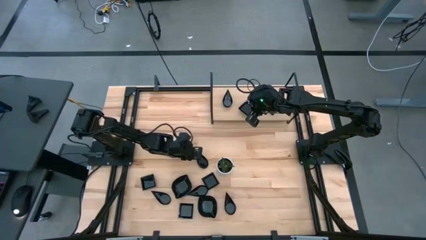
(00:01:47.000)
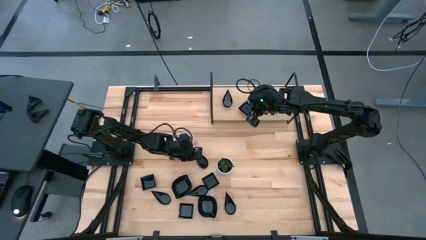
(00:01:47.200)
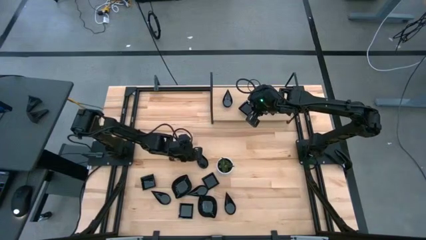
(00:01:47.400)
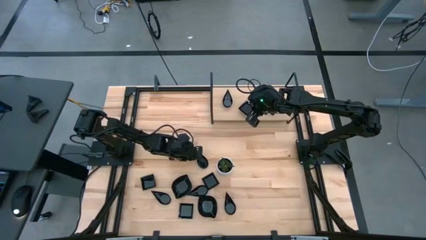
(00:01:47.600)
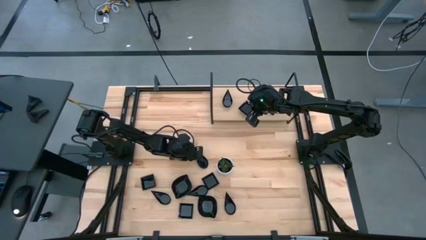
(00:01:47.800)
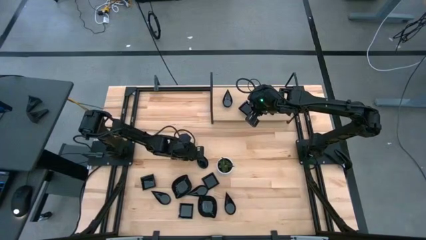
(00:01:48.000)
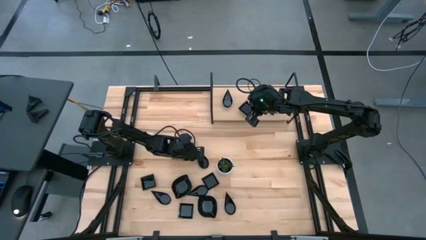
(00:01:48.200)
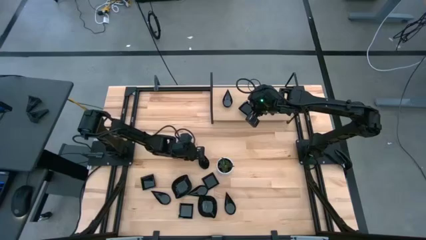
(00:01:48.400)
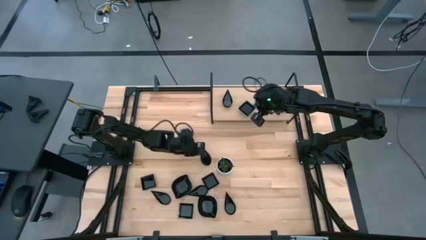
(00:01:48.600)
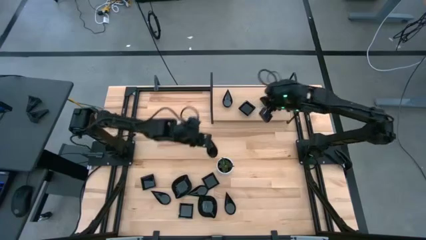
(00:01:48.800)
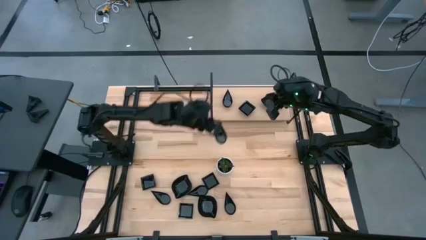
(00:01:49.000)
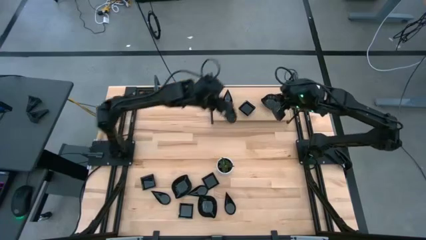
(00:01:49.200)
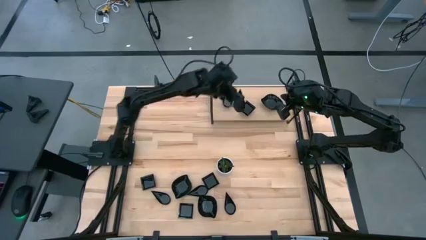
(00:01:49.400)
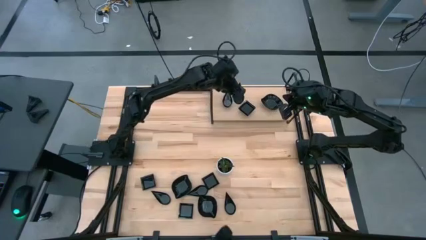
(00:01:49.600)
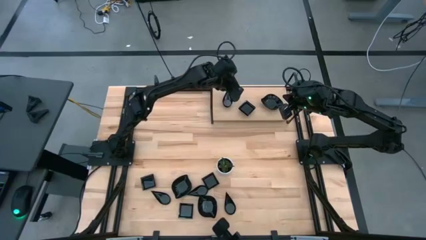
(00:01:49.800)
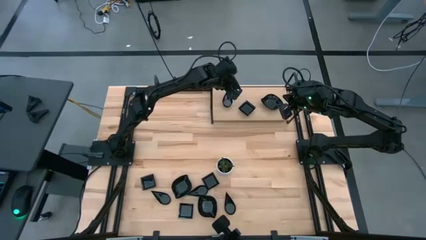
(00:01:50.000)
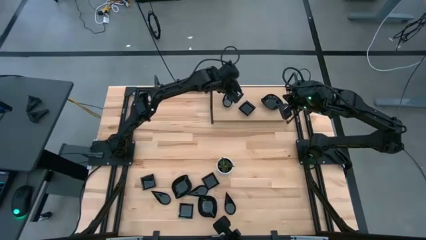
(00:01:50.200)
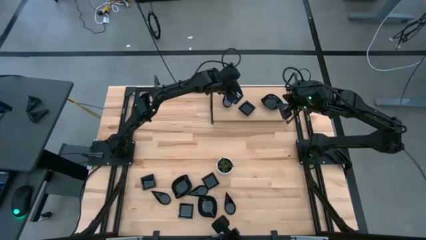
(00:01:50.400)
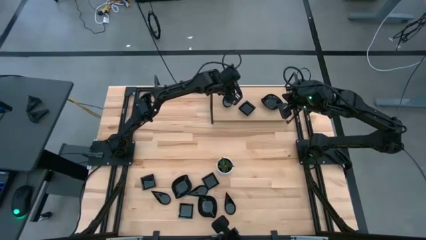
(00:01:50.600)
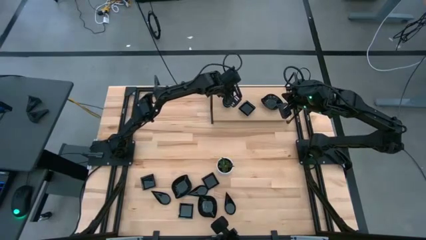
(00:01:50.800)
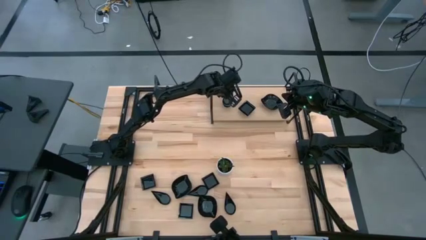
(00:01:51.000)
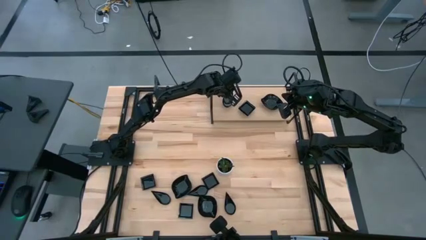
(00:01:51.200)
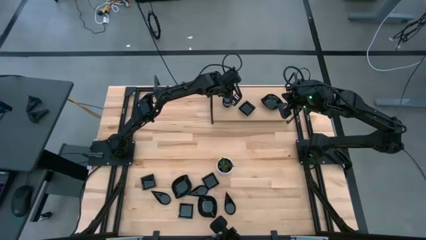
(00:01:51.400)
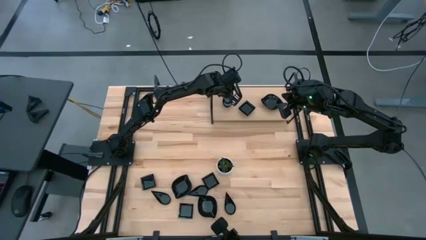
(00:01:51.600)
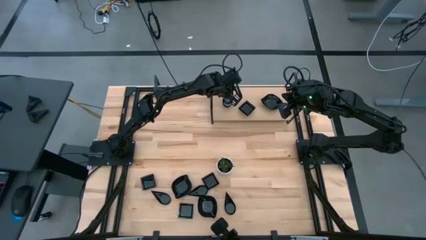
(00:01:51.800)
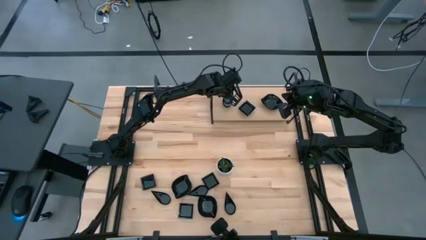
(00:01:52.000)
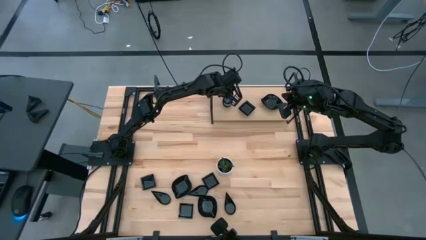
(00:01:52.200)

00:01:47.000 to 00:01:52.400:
Task: Pick & Place Mini shaped plates
Stack the drop shaped plate on top of the drop shaped plate on the shelf

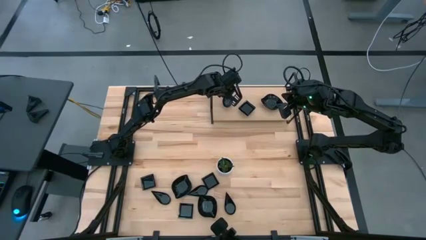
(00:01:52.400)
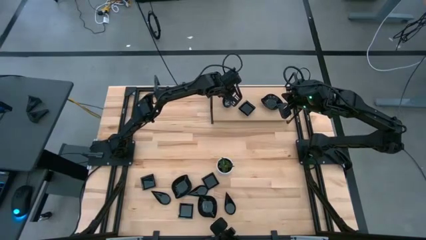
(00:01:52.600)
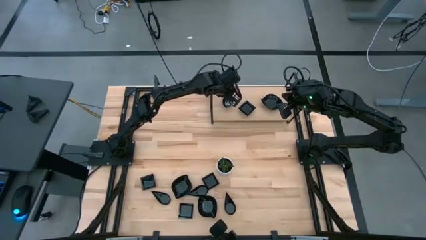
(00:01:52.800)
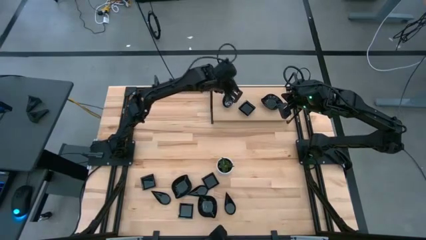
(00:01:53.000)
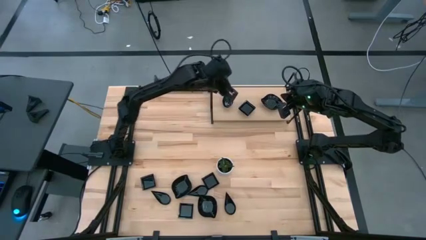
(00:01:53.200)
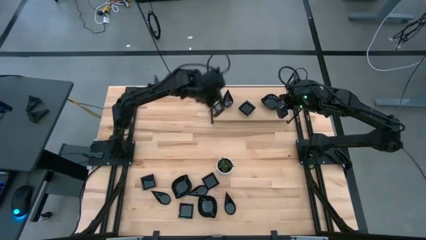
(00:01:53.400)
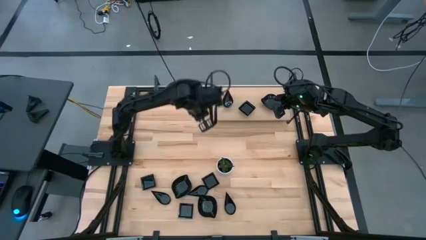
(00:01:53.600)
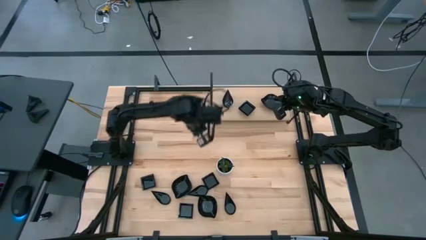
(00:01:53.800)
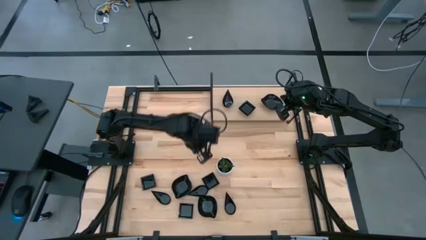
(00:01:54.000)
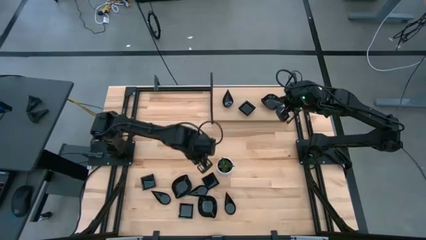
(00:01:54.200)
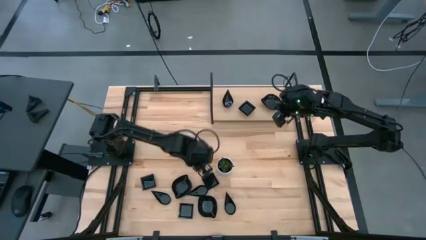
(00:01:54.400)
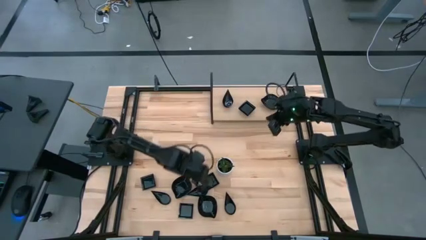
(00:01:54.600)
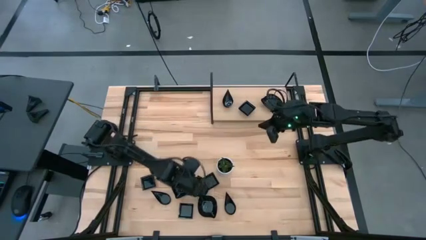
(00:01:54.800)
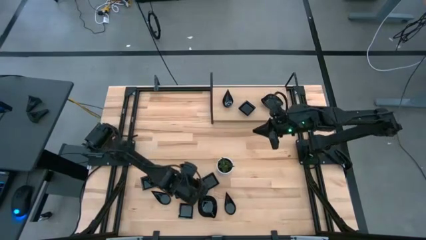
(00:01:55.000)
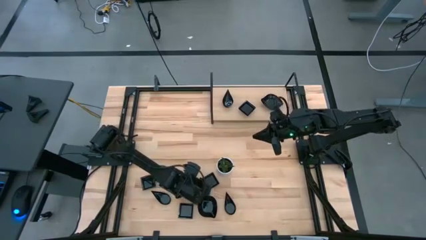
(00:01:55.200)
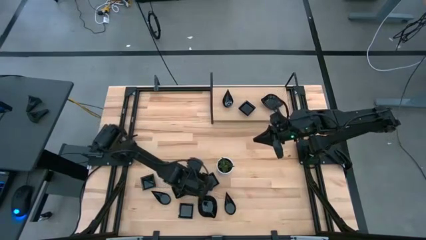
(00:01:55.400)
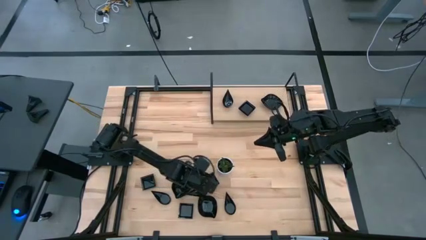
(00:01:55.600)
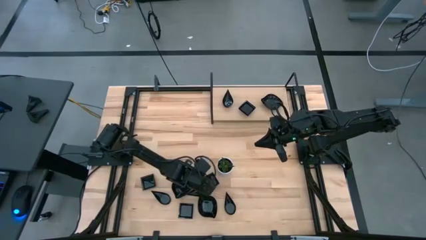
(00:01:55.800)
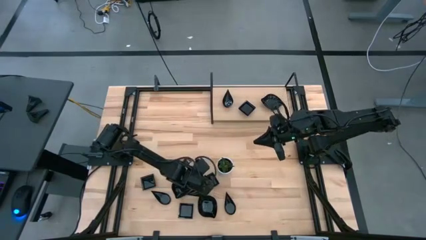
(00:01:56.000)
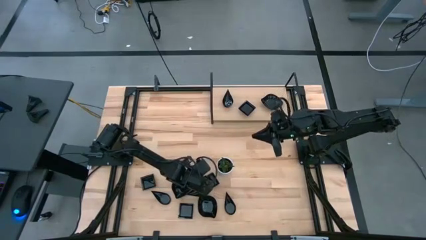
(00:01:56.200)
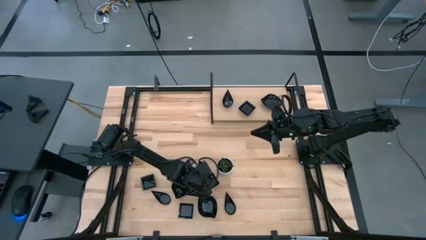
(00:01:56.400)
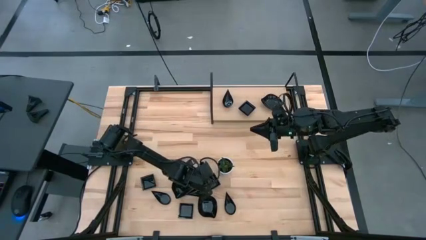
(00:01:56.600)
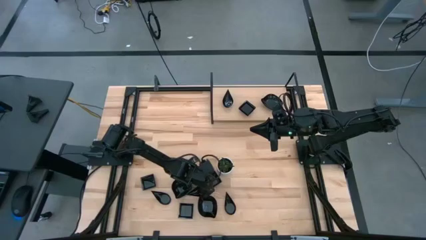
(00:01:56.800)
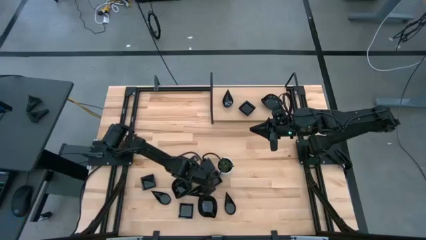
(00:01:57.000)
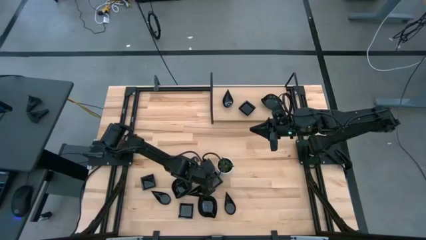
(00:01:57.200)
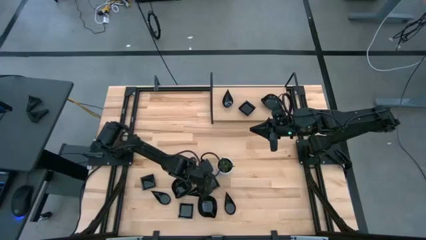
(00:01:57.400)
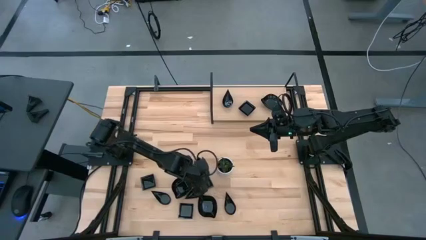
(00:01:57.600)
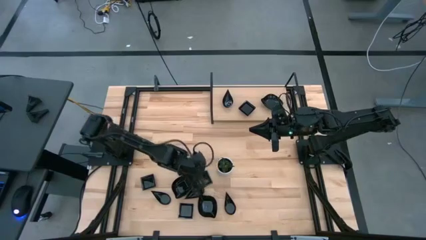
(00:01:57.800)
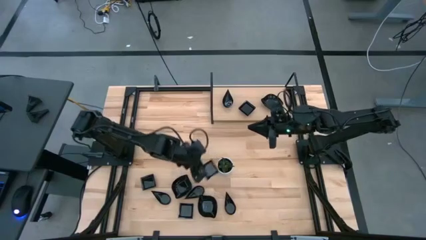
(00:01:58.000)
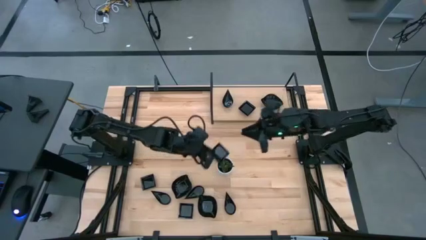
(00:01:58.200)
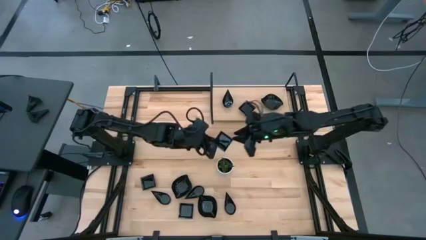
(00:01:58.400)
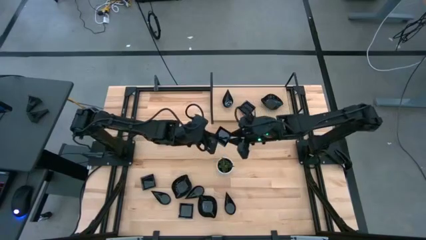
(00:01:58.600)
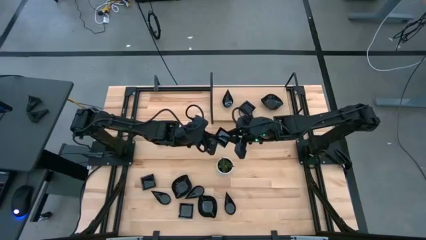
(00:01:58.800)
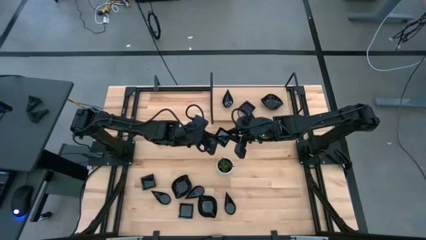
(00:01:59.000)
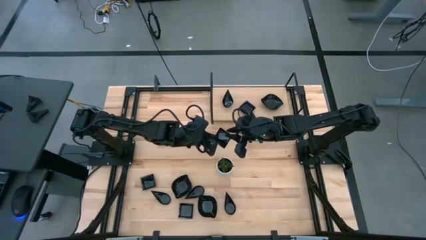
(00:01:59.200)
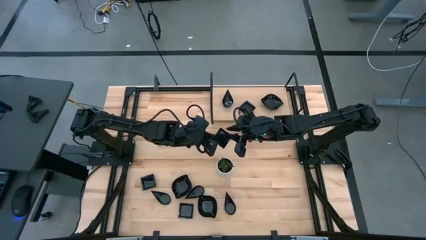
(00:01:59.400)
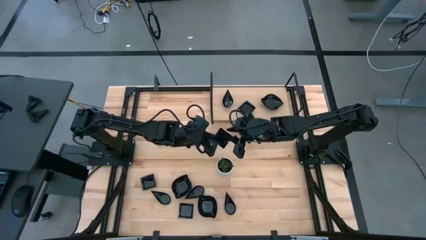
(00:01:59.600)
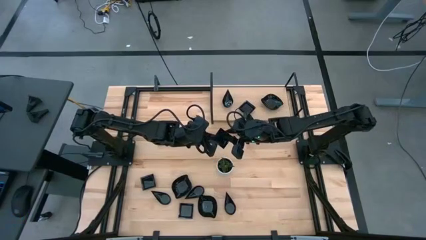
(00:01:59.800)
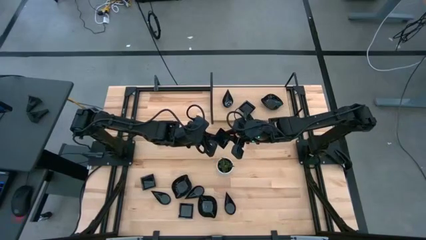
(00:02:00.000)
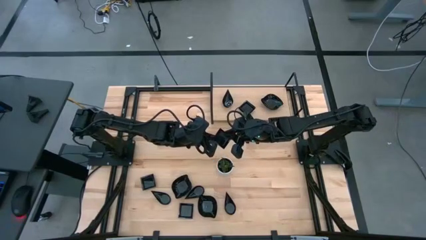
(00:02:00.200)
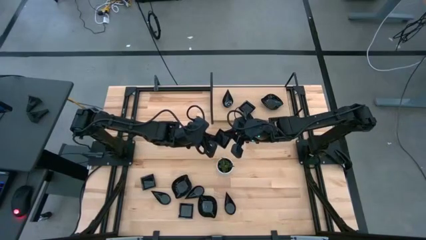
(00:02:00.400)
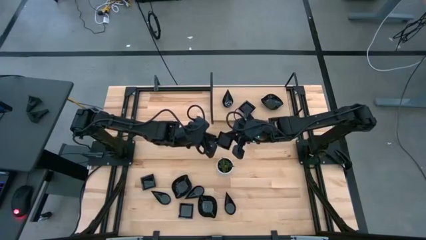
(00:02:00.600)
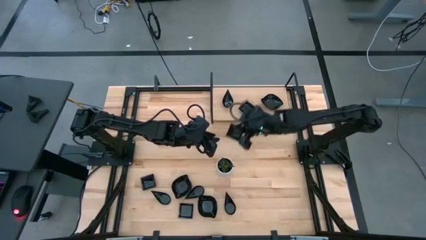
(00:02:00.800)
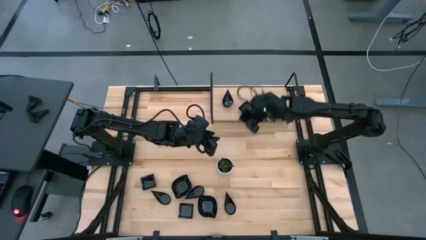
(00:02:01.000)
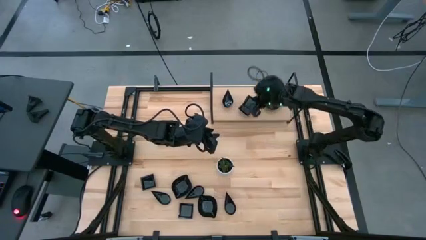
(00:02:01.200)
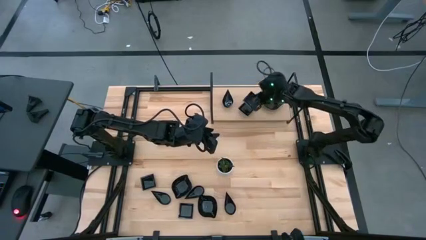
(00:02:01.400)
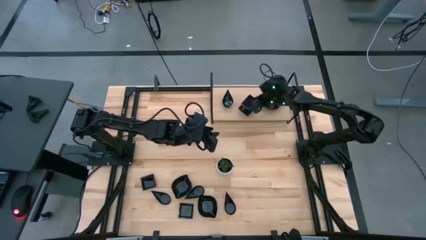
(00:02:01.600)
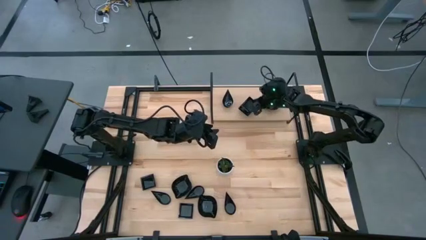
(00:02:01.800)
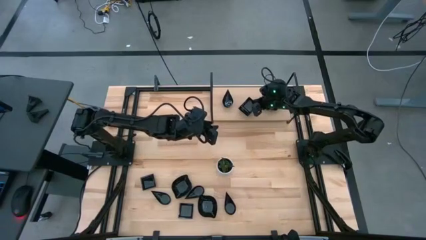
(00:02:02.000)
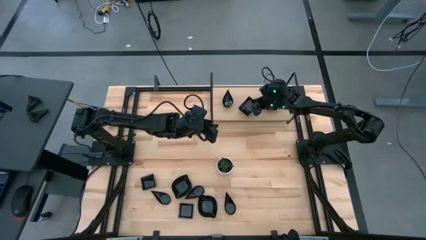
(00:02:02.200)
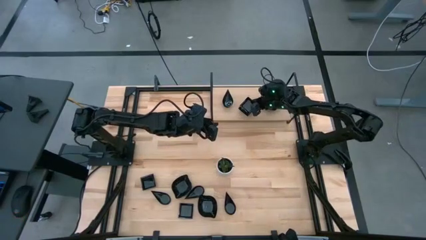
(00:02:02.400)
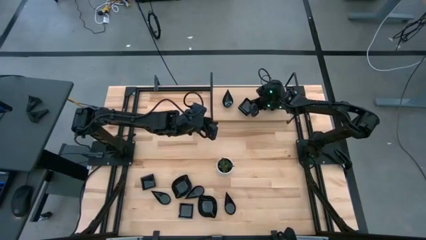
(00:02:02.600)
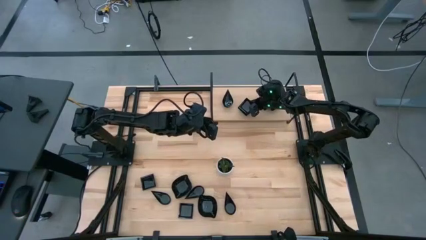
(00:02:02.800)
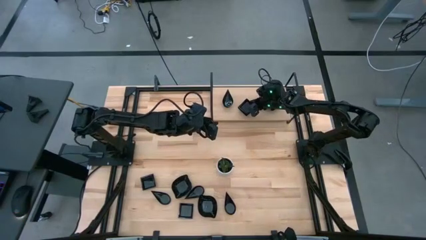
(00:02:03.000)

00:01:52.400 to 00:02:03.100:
Stack the square plate on top of the square plate on the shelf
